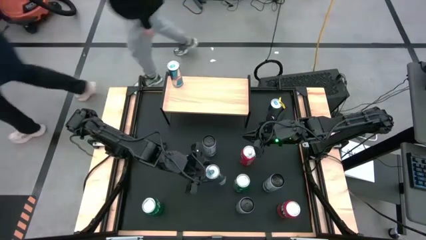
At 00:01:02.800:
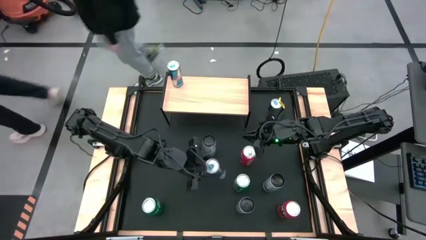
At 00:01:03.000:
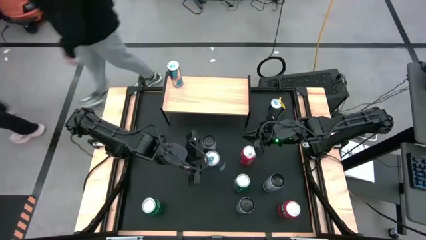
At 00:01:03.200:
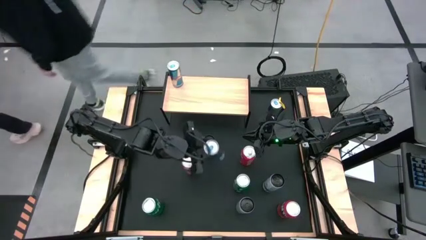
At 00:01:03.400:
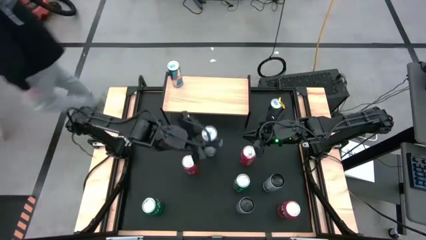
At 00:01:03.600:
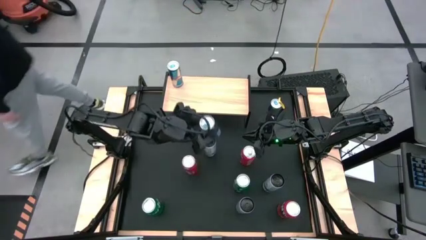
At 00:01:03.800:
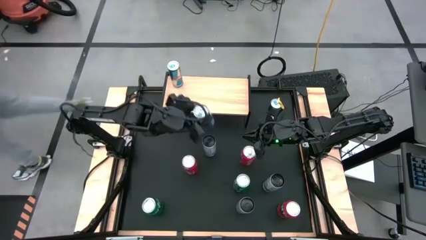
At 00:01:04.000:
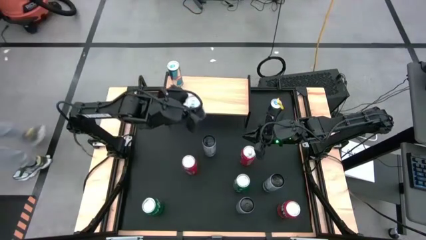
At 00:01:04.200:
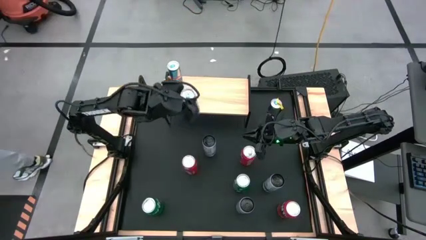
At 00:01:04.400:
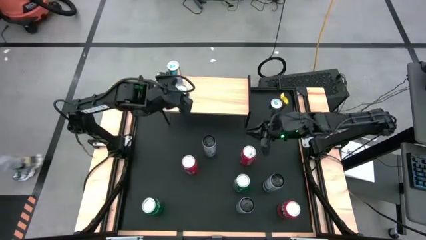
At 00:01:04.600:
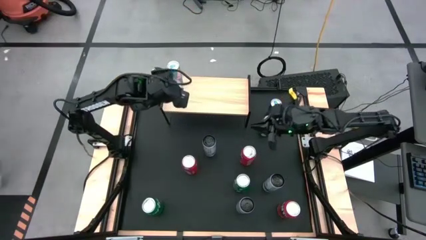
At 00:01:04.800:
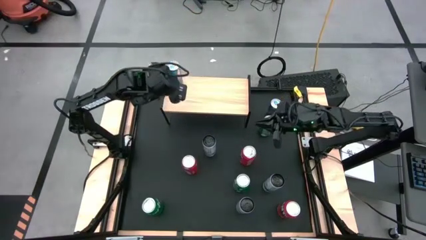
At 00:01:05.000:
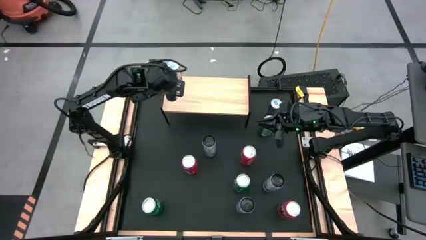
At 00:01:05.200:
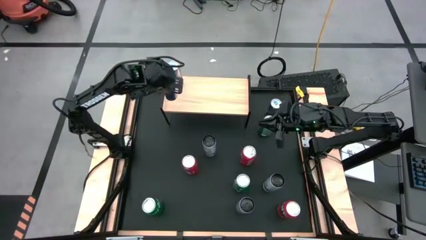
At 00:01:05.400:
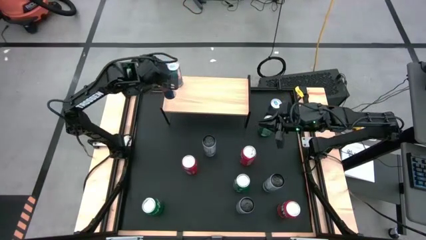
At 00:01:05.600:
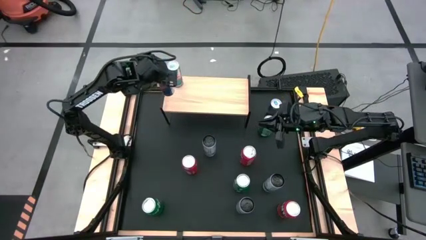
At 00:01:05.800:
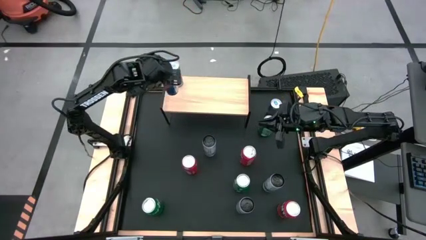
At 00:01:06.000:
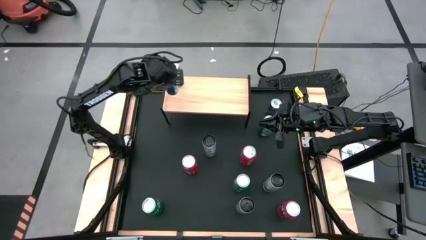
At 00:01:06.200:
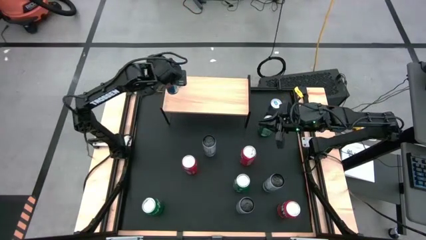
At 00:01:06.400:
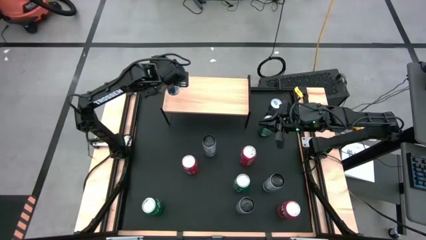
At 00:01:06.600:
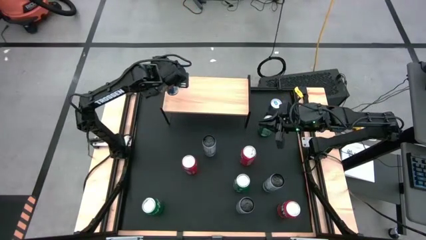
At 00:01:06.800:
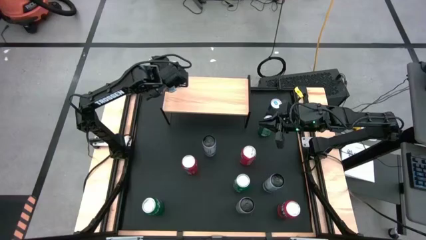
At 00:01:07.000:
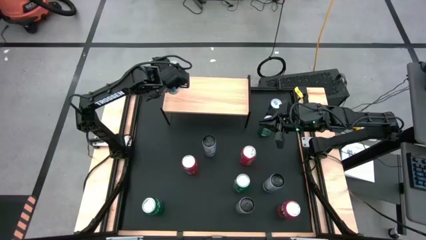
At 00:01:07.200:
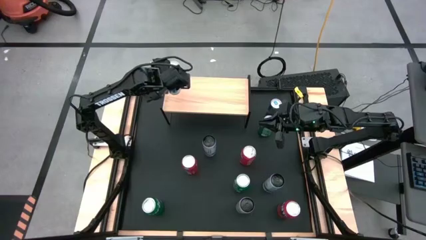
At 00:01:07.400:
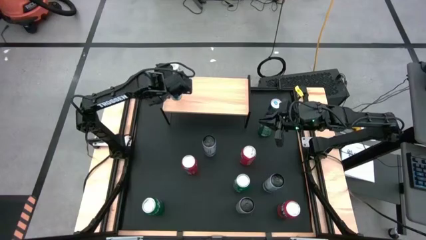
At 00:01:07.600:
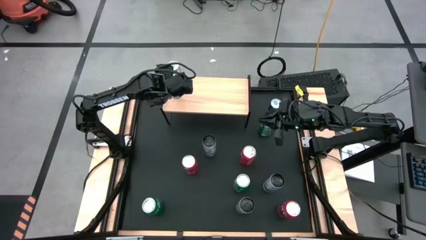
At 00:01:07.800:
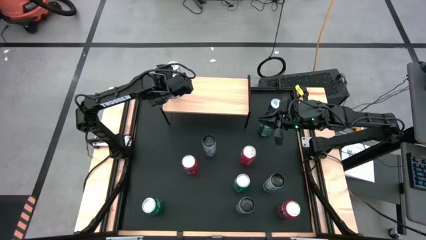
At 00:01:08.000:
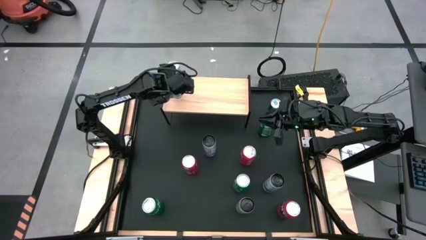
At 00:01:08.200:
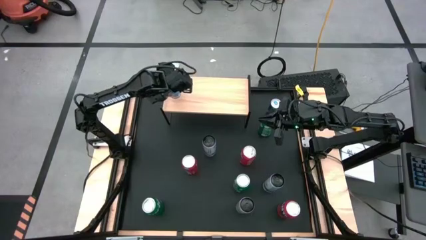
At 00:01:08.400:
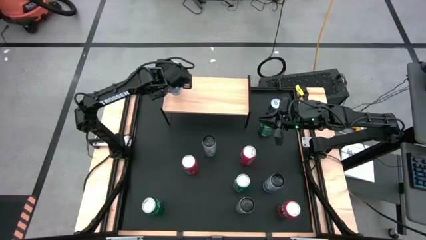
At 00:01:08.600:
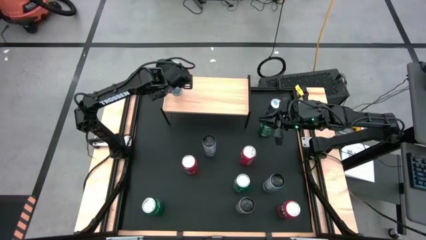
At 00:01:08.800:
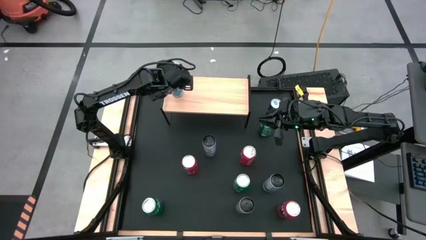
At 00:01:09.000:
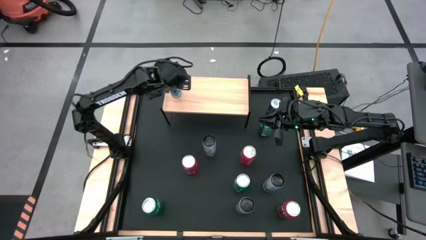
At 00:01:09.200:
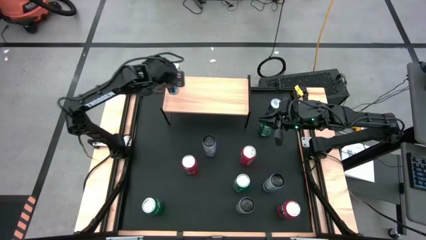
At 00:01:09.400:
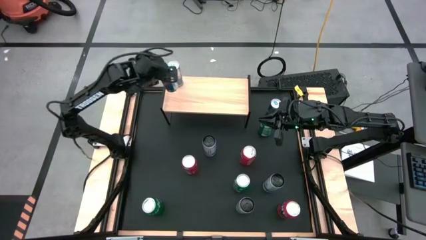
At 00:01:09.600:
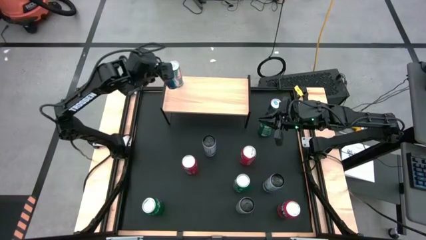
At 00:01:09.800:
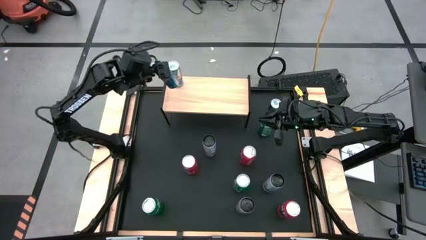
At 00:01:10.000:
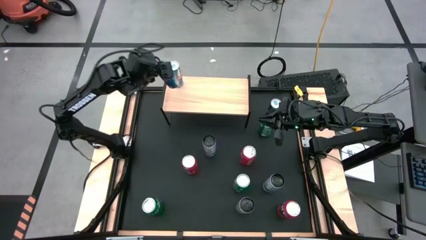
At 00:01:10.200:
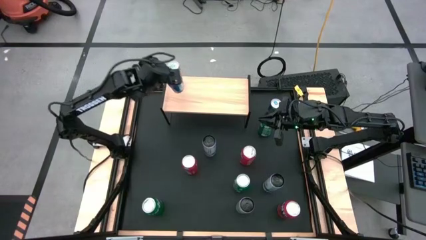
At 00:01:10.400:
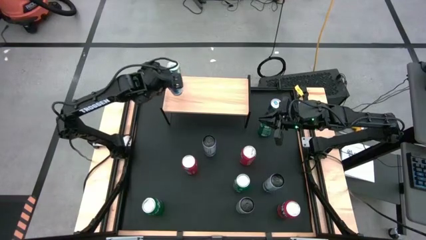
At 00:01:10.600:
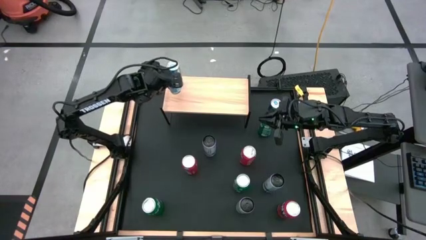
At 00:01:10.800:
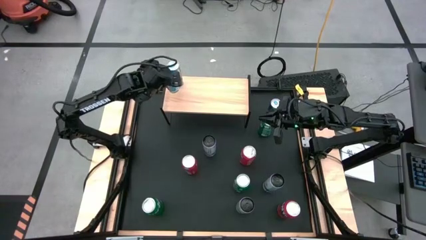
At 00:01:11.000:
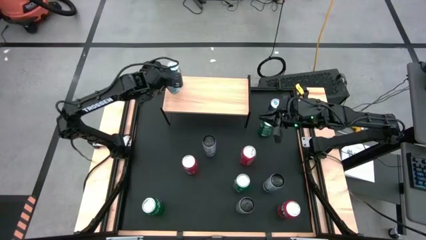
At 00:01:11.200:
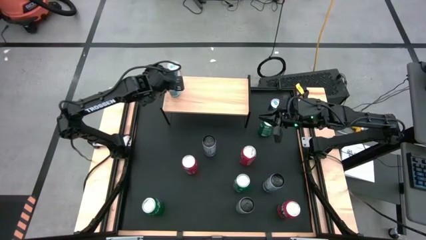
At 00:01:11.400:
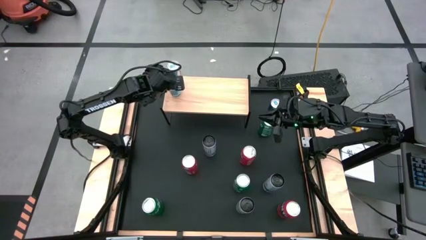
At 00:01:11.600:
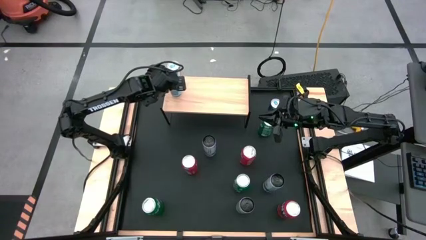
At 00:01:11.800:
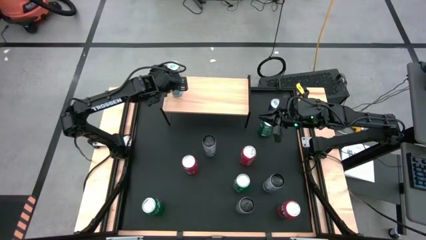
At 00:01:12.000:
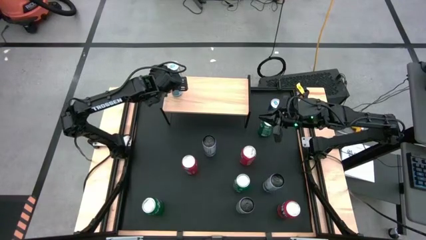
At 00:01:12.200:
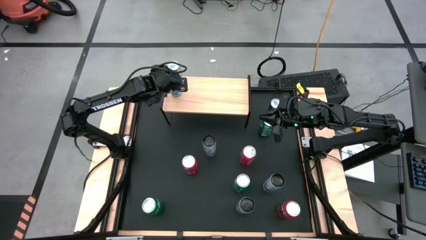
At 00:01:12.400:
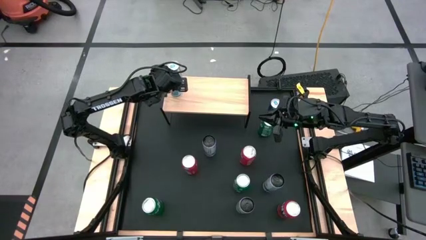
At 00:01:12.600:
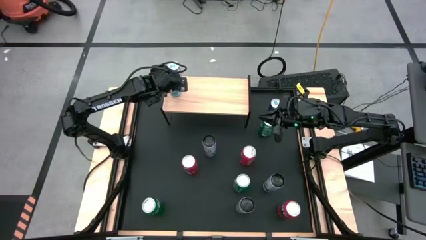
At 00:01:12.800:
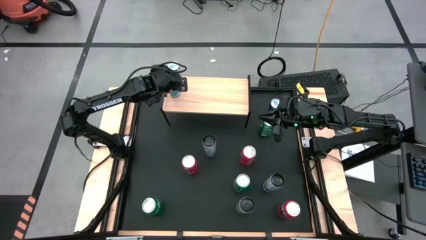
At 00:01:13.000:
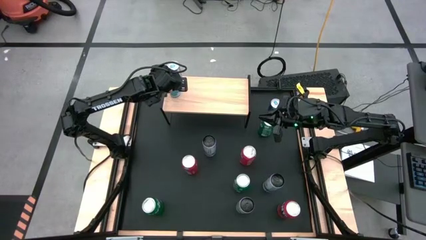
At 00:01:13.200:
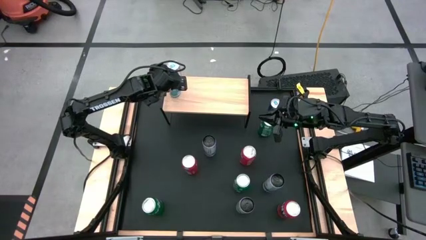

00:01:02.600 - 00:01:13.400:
Task: Place canned beverage on shelf
Put the bottom blue soda can on the shelf

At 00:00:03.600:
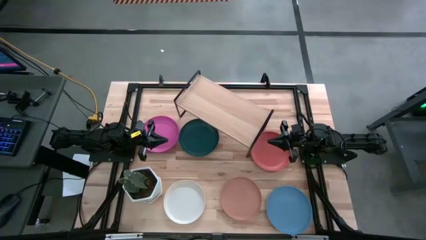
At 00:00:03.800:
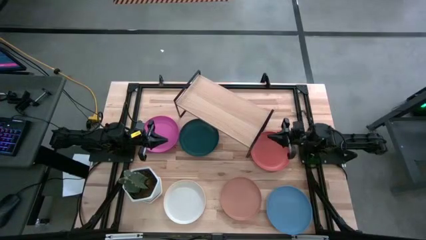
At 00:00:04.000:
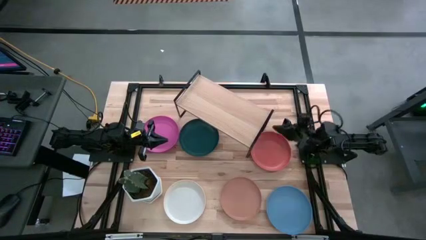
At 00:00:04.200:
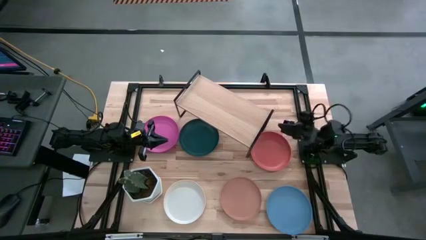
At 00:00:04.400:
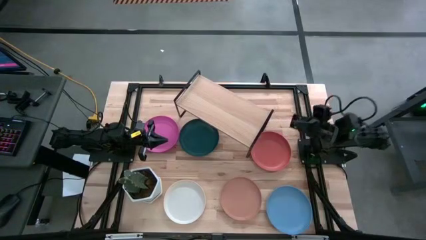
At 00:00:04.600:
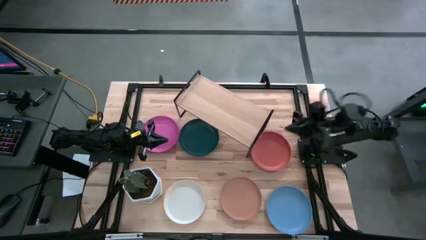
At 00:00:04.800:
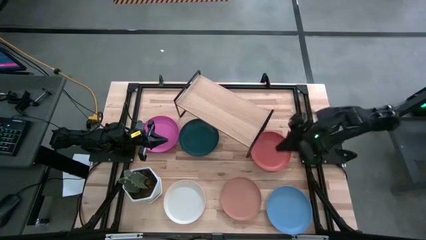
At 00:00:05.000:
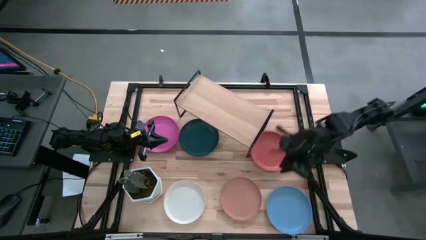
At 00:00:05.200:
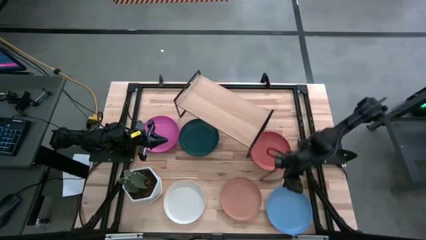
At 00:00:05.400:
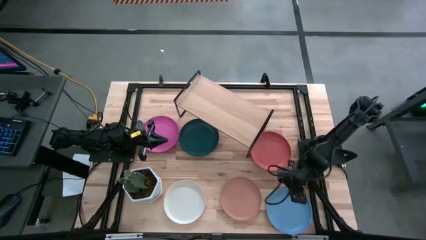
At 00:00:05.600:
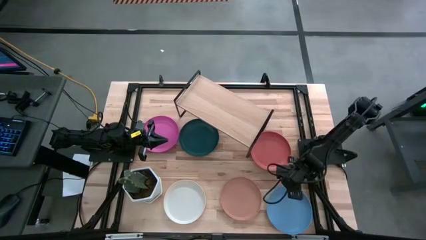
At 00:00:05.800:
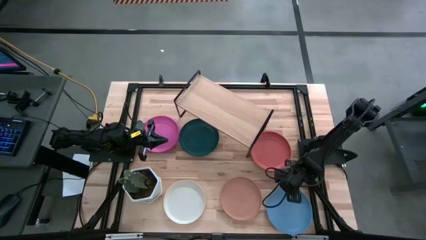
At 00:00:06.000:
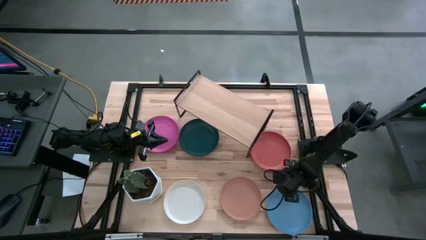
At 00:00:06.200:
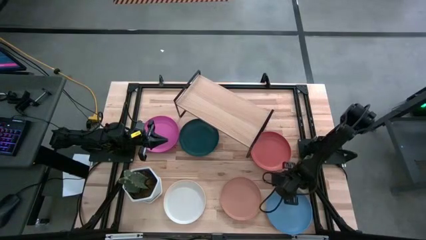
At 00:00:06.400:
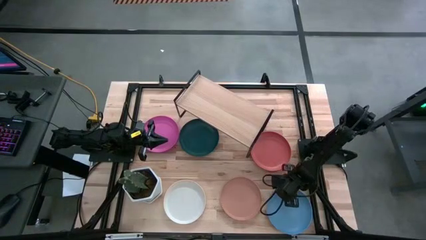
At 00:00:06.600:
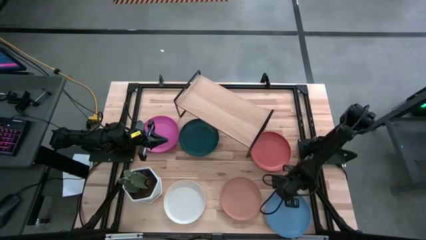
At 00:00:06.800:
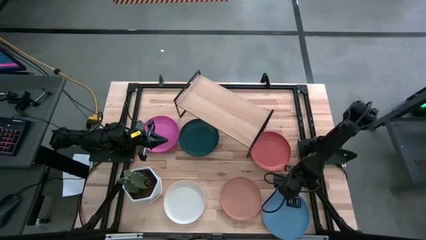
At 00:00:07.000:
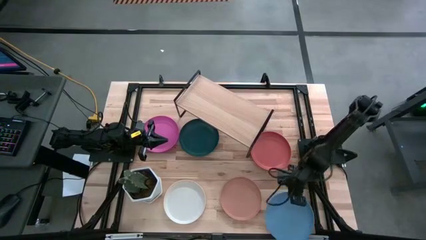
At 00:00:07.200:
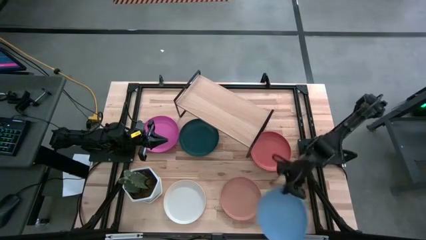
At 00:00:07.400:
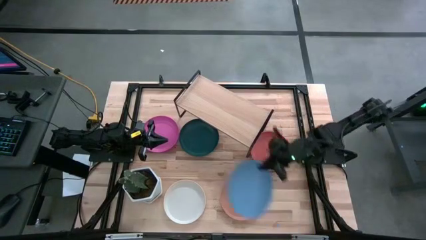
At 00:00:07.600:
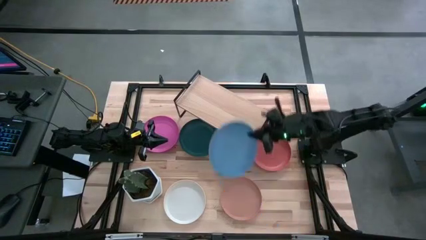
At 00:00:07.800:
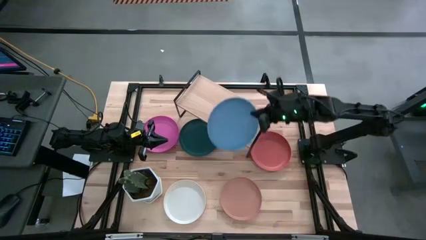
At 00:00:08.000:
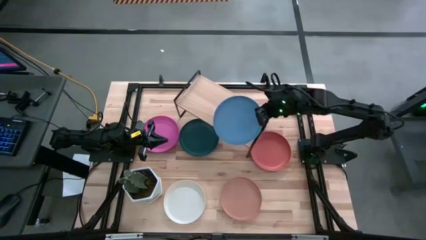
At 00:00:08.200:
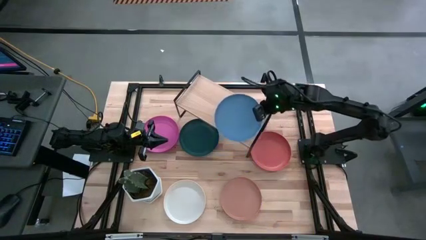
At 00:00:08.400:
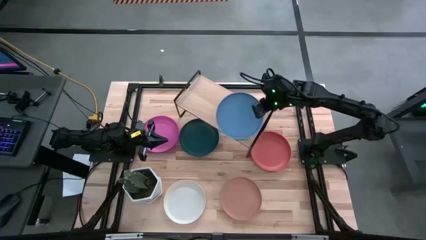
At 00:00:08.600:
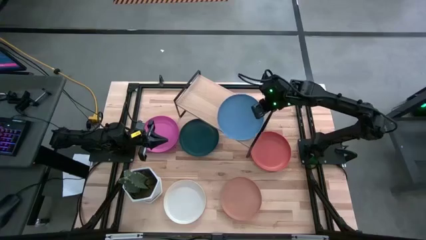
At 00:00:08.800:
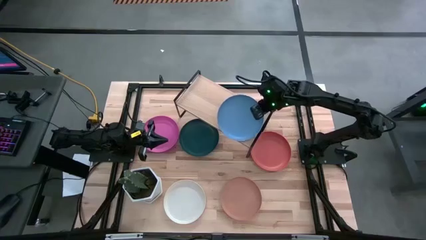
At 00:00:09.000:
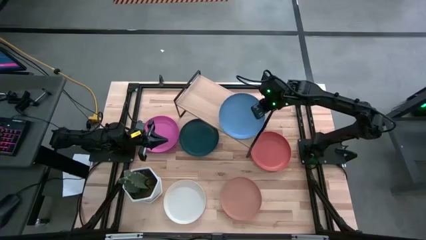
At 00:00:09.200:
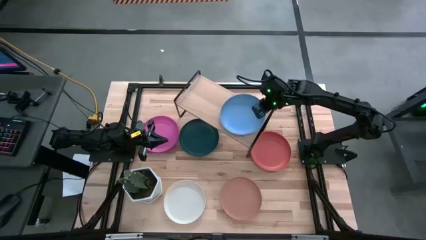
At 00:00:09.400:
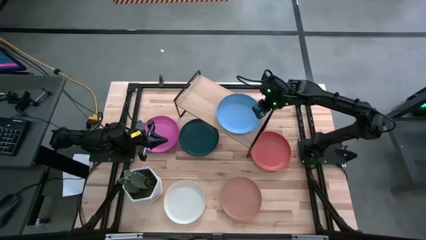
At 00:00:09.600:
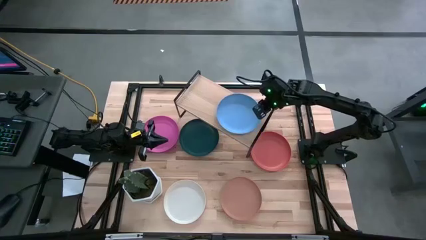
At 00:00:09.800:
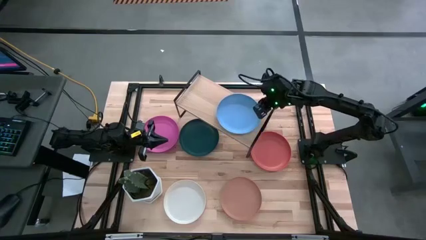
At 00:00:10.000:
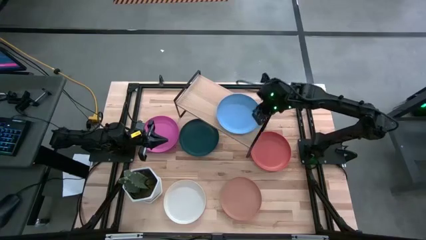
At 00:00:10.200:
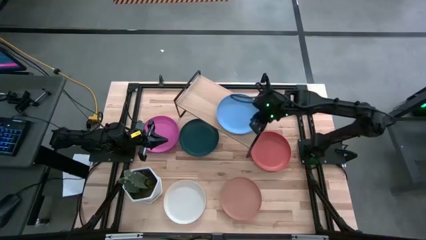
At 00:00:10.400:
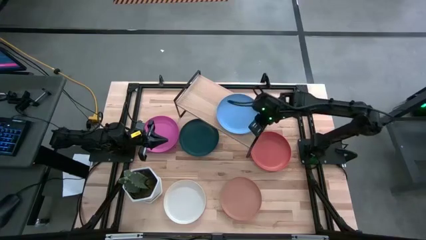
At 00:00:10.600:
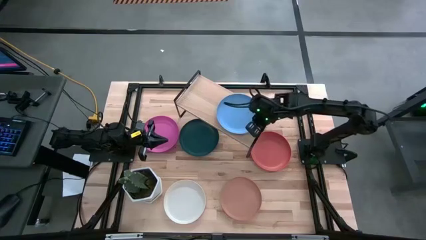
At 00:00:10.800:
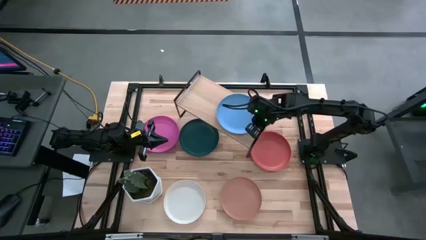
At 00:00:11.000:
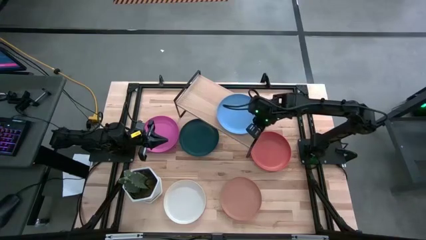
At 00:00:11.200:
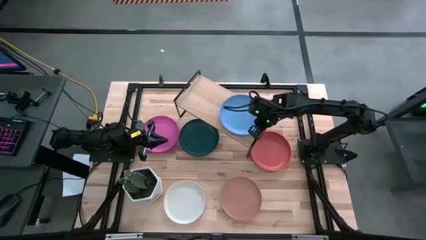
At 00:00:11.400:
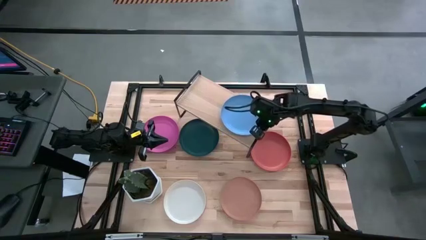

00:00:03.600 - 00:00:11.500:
Task: Place and stack plates onto a shelf
Put the blue plate on the shelf
